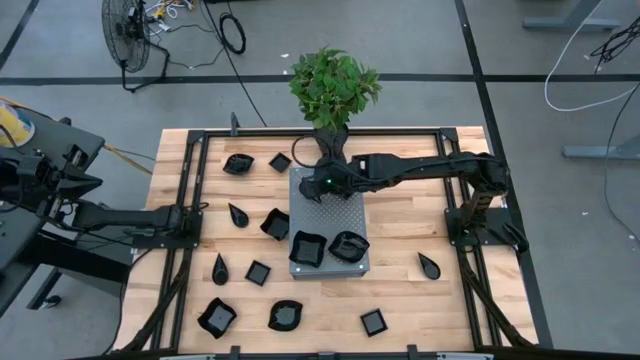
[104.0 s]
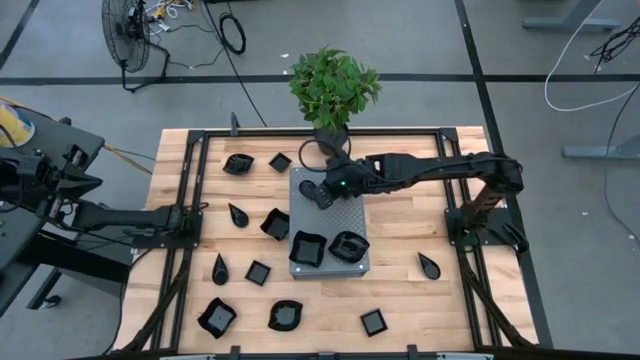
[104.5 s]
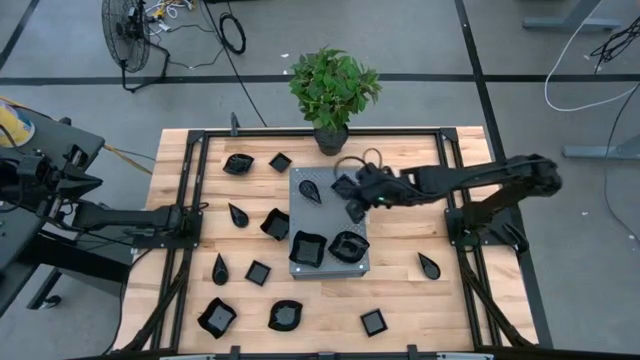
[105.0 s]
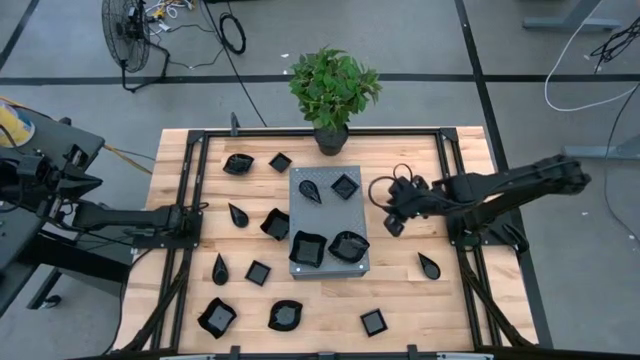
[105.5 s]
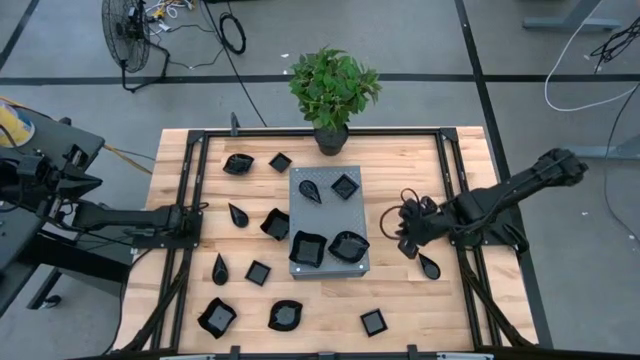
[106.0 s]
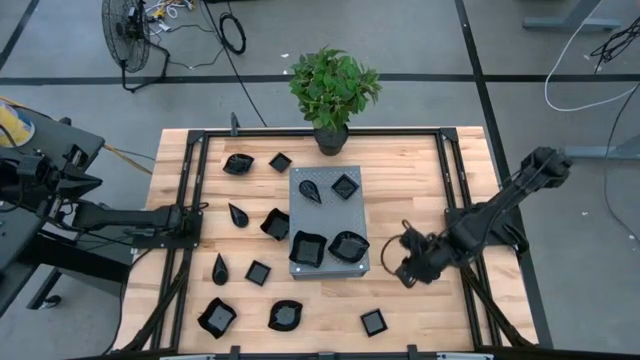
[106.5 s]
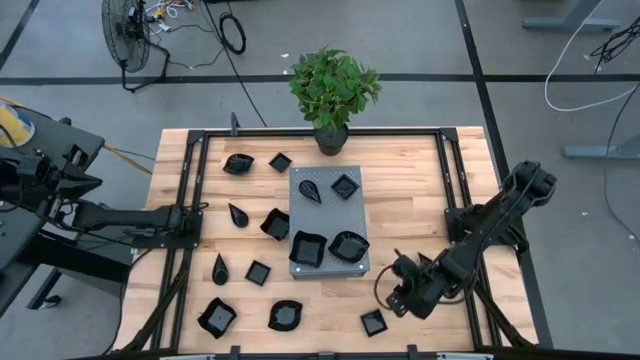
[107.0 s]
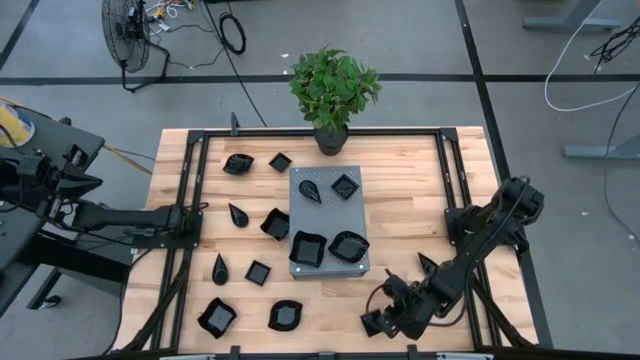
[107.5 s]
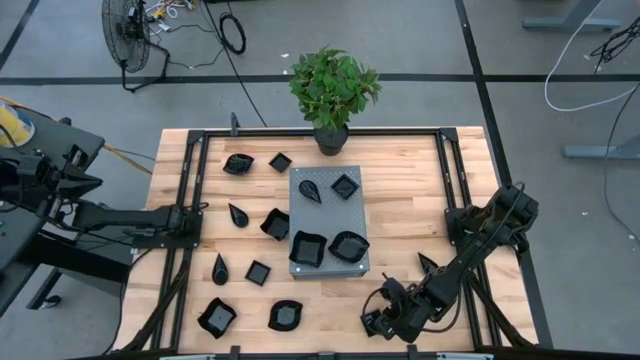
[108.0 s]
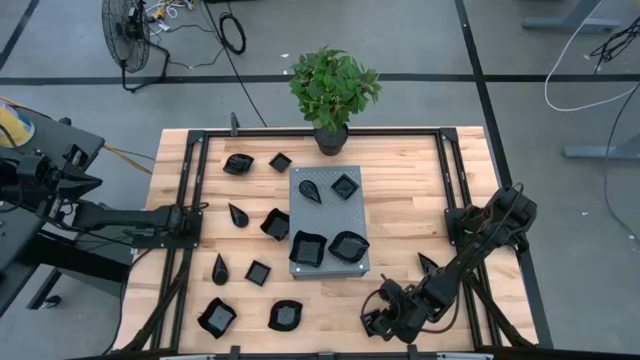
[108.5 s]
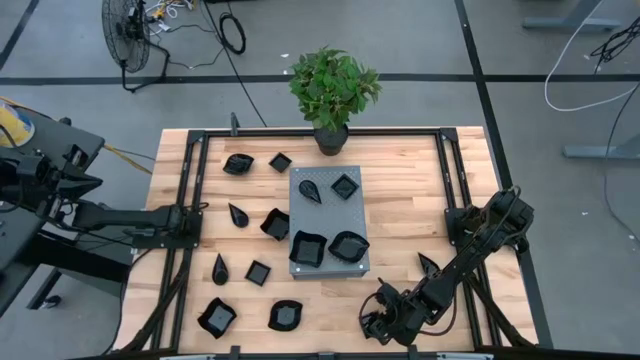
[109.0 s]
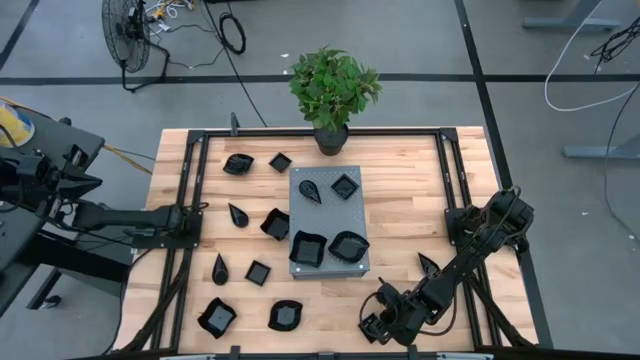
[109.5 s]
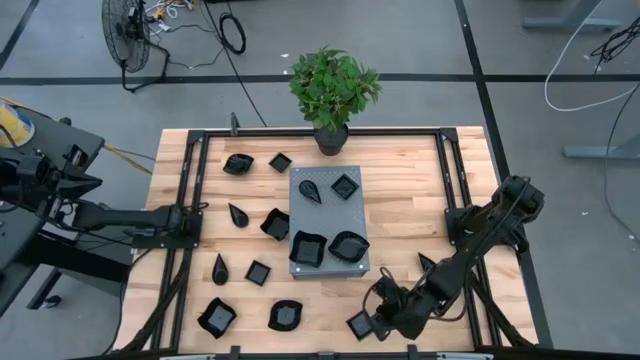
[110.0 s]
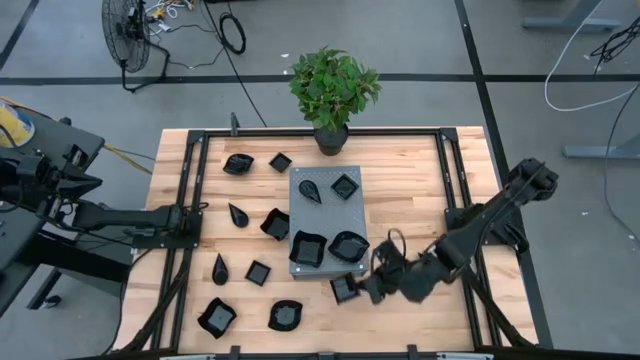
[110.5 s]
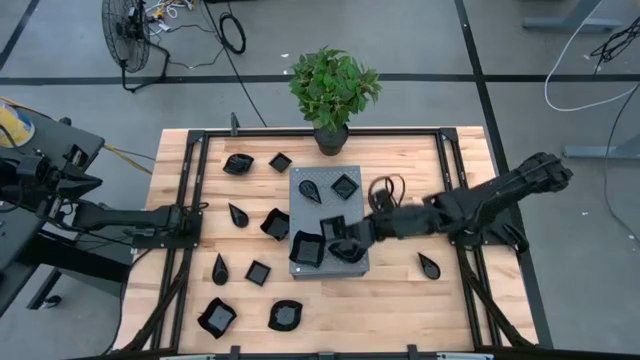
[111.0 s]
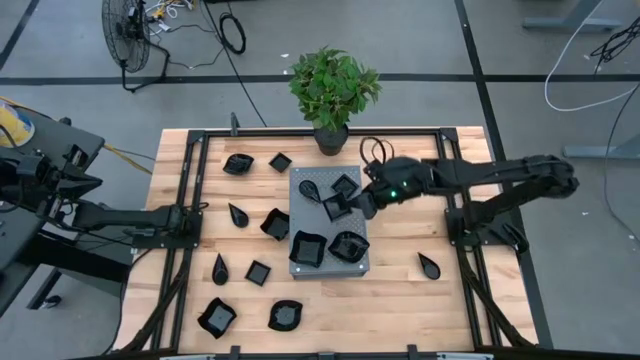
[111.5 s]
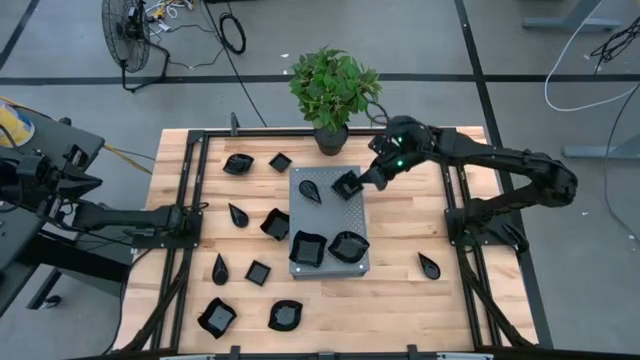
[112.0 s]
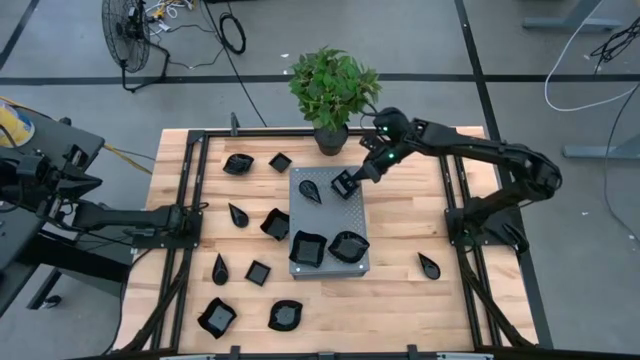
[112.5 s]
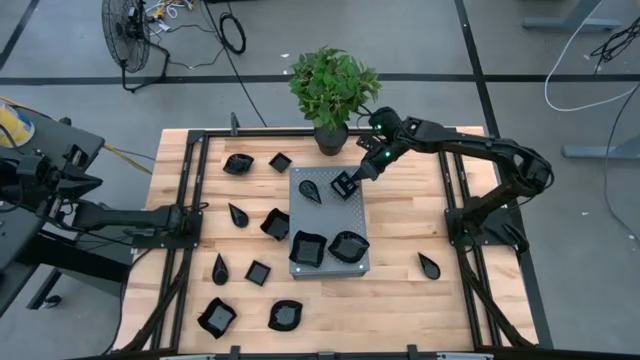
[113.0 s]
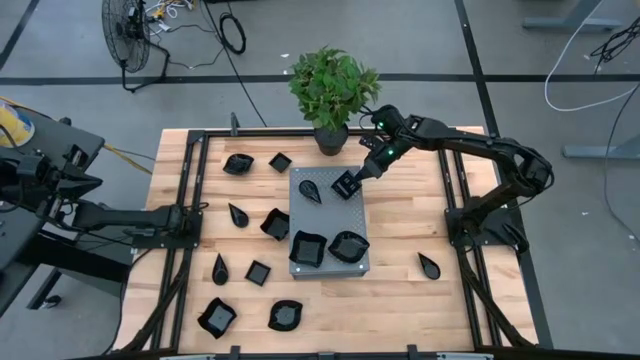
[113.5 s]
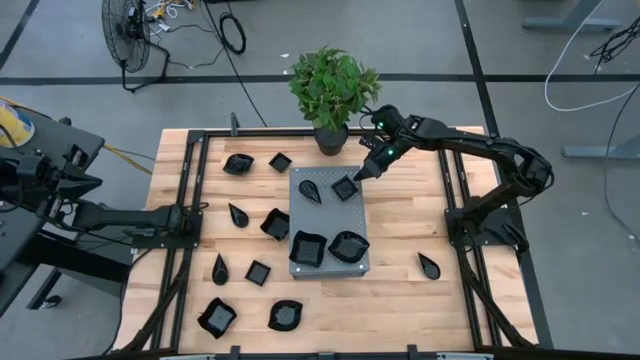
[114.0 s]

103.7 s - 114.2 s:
Task: Pick & Place Mini shaped plates
Stack the black bowl on top of the black bowl on the shelf

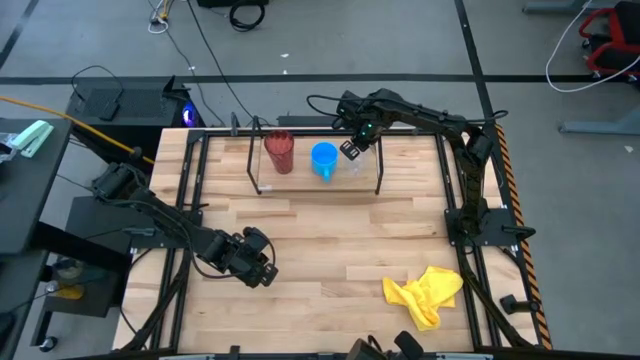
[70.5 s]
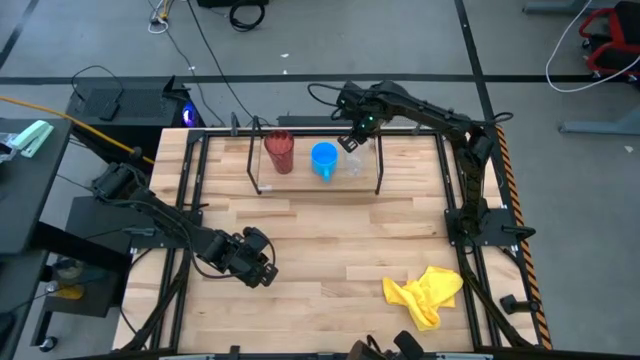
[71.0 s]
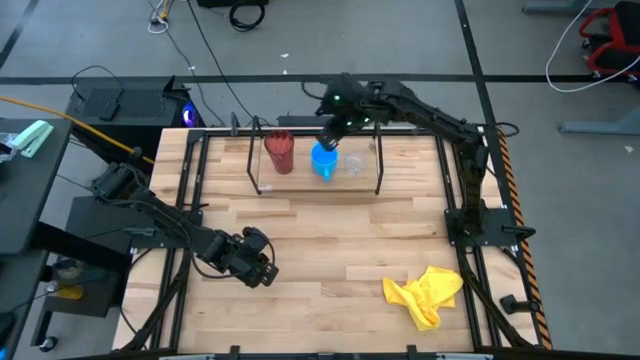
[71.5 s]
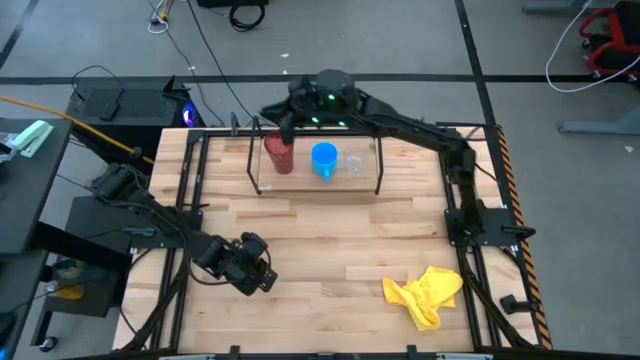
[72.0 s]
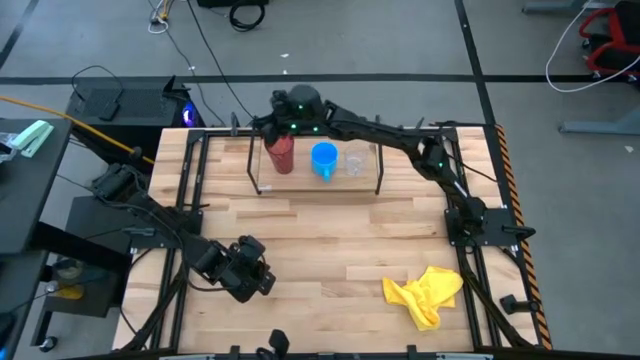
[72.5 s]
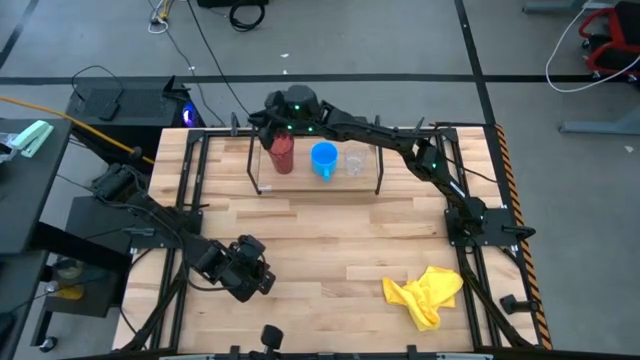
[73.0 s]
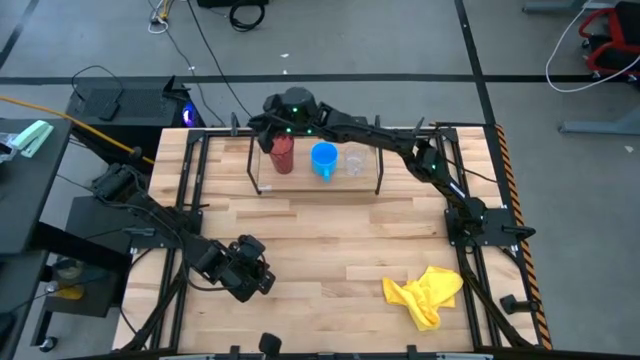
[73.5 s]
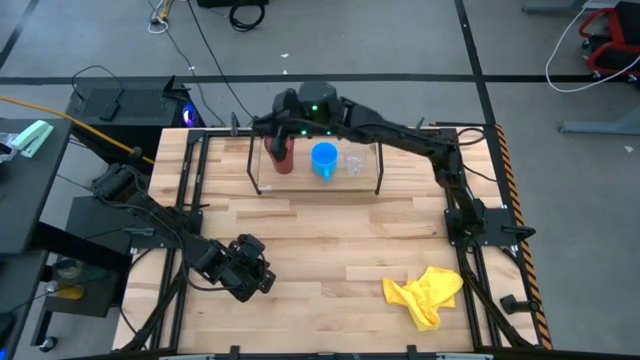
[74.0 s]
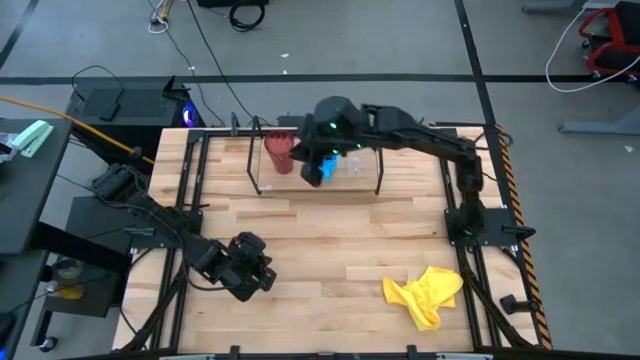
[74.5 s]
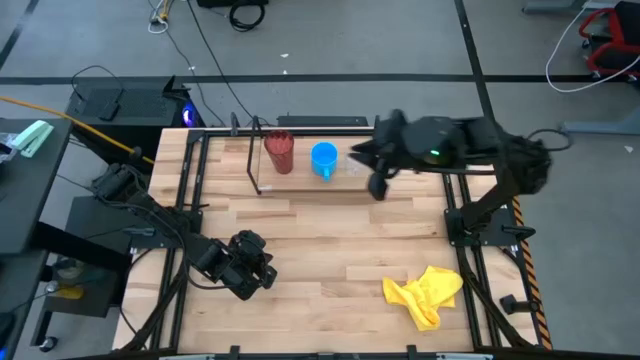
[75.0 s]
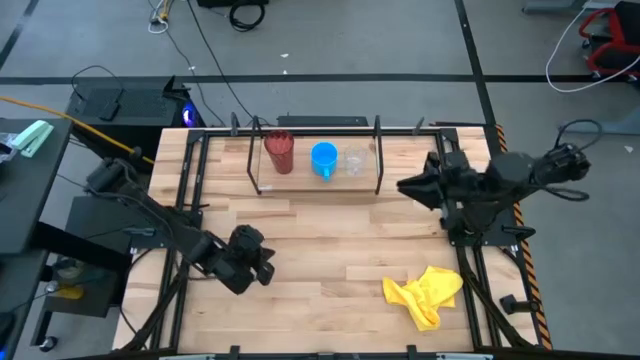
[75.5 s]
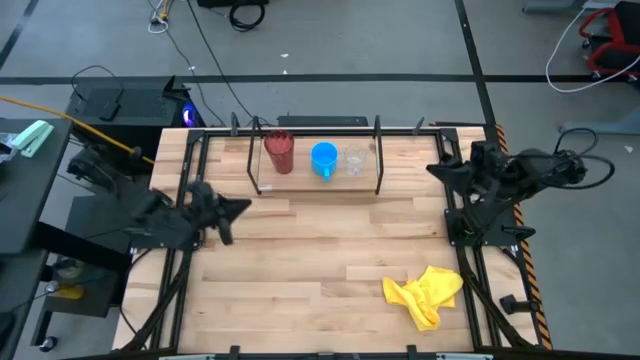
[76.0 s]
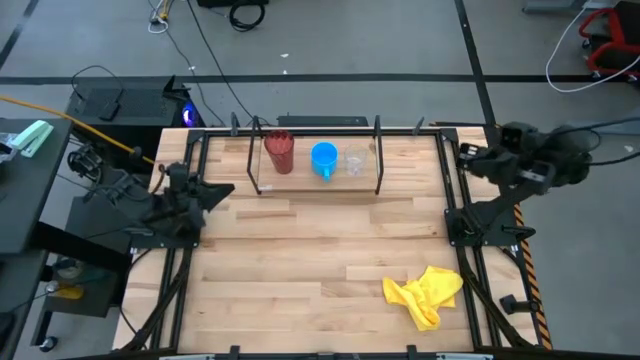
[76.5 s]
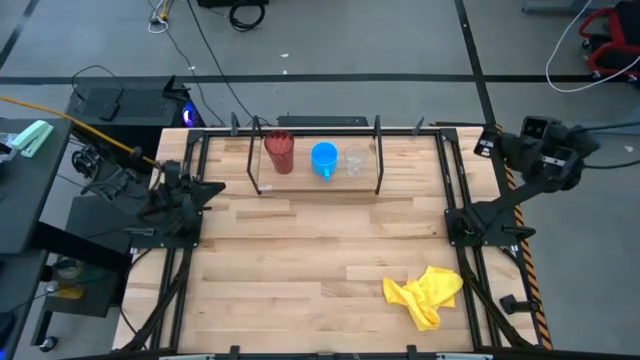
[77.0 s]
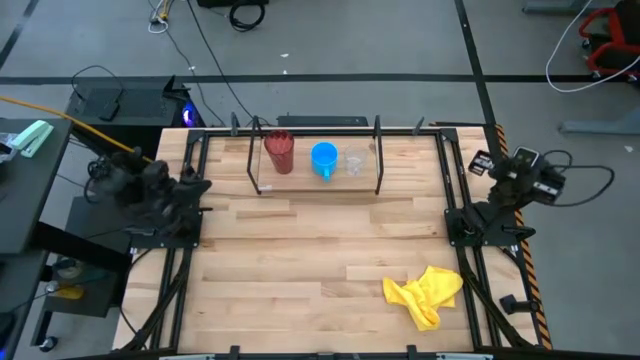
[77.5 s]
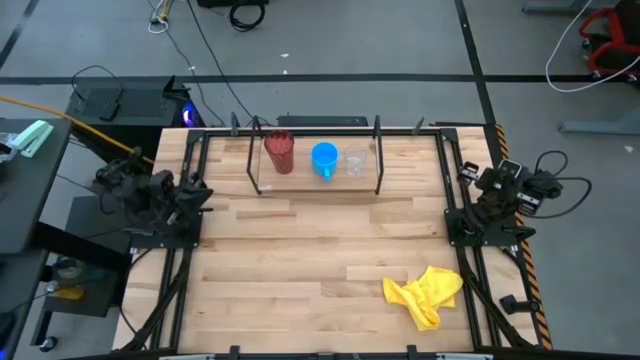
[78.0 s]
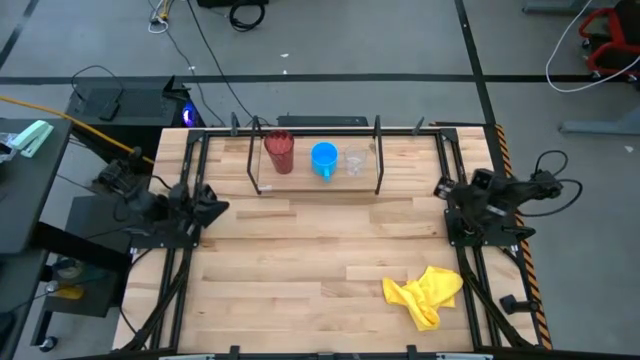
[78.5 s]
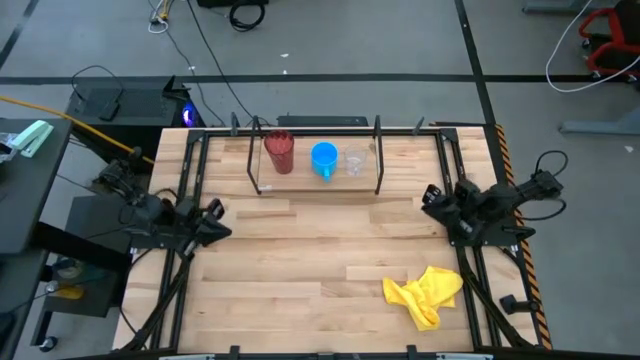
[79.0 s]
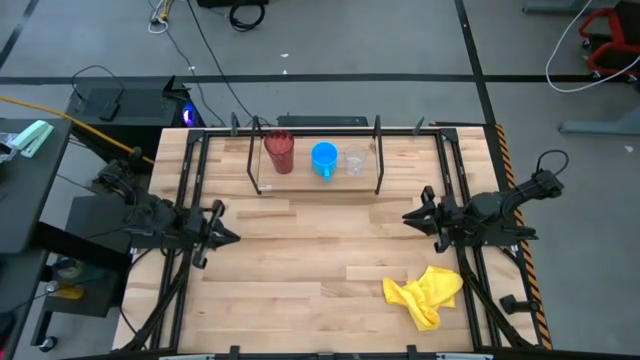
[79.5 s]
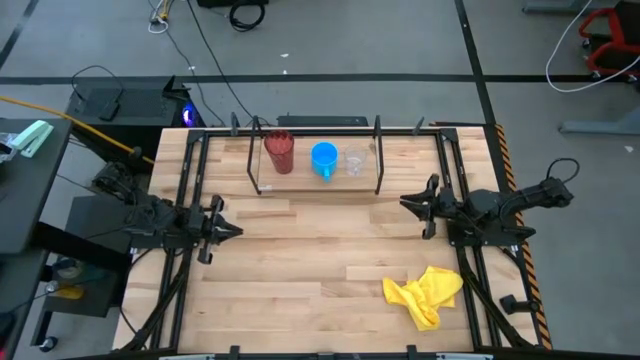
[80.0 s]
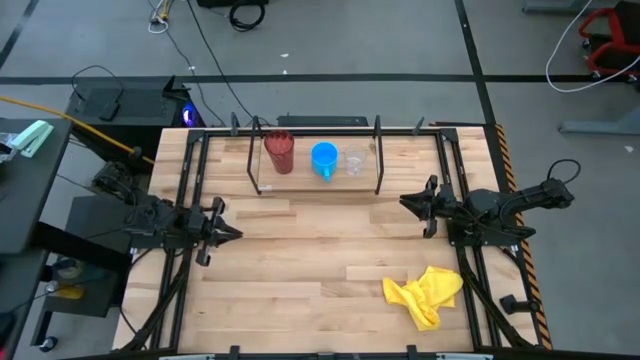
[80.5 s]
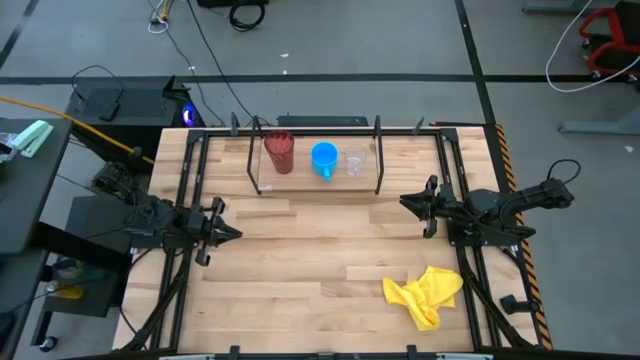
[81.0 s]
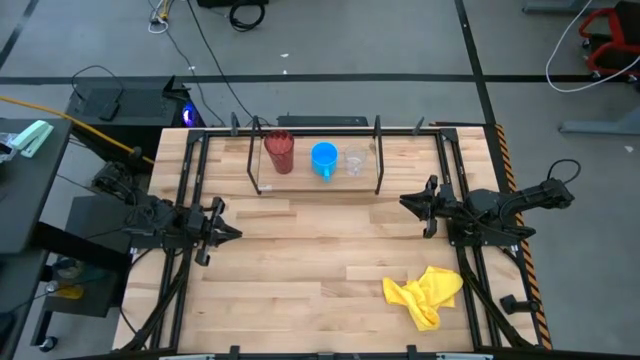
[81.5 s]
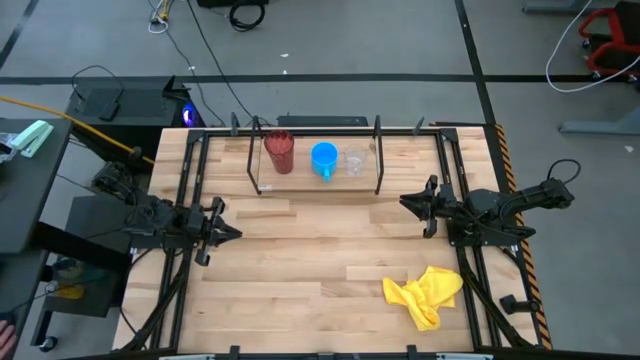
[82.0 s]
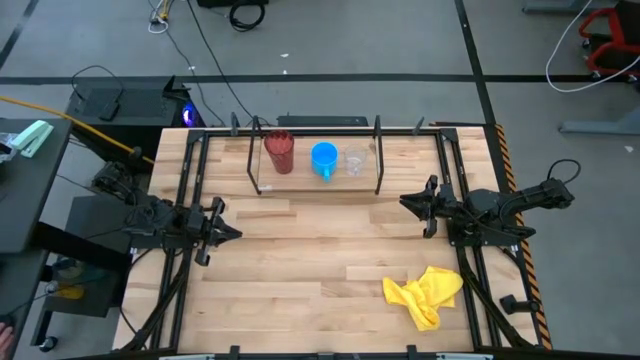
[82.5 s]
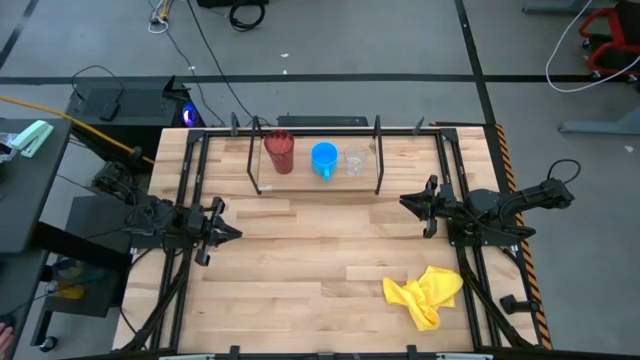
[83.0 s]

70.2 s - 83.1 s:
Task: Stack small to large cups/mugs on shelf
Return to Home Position
